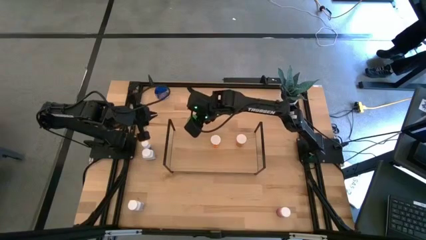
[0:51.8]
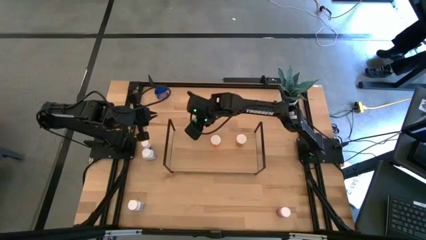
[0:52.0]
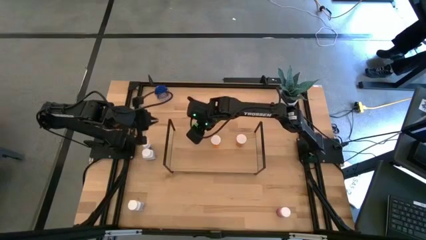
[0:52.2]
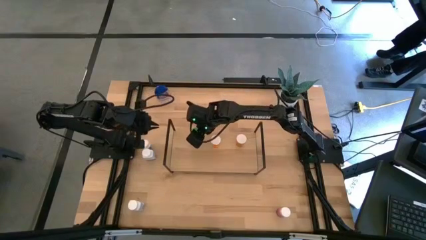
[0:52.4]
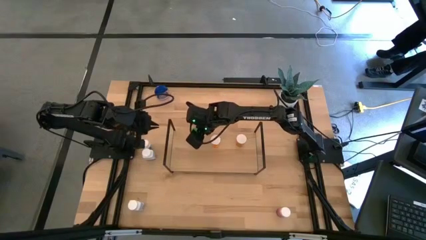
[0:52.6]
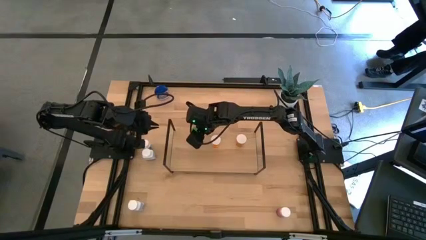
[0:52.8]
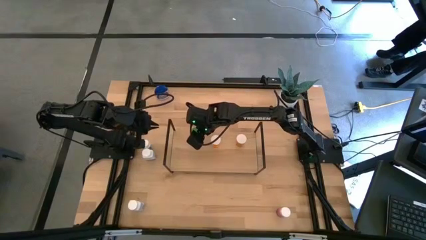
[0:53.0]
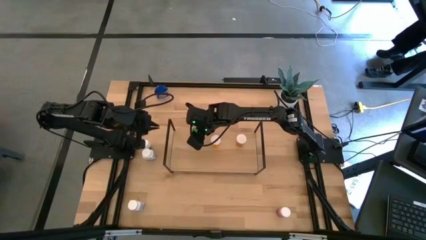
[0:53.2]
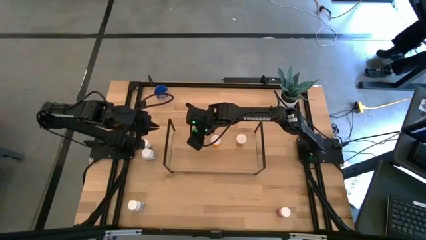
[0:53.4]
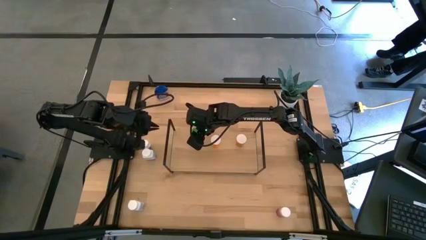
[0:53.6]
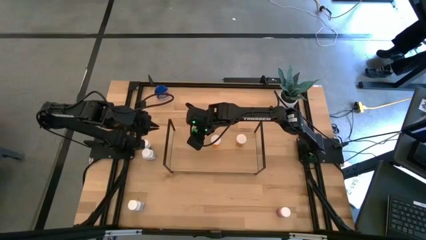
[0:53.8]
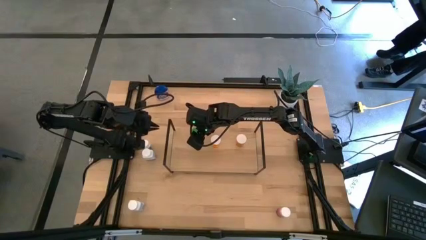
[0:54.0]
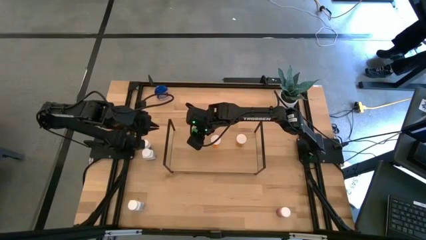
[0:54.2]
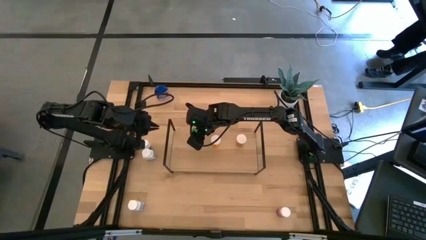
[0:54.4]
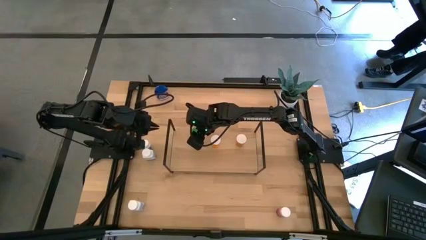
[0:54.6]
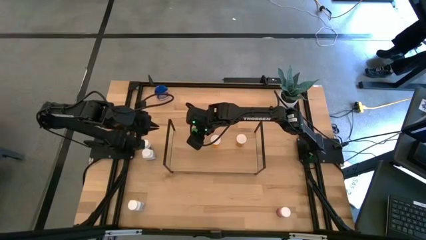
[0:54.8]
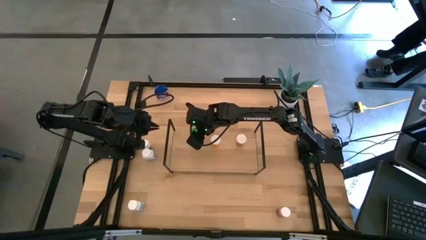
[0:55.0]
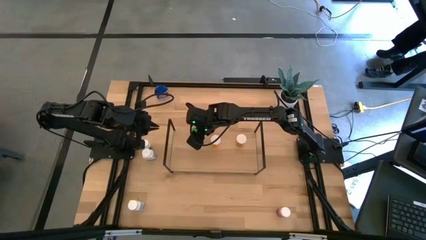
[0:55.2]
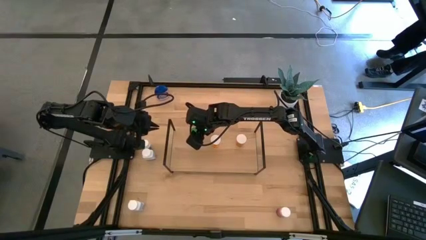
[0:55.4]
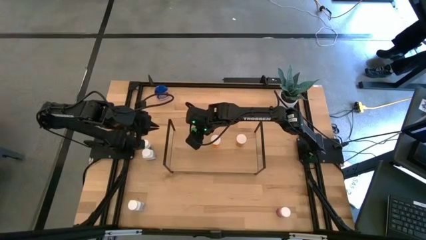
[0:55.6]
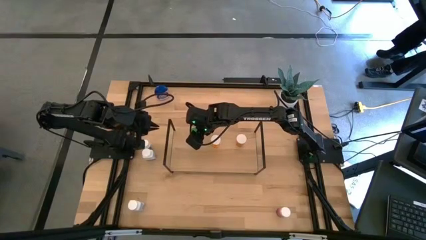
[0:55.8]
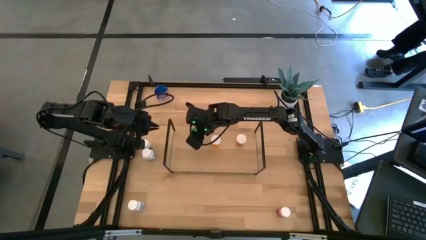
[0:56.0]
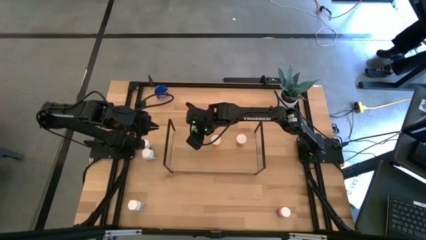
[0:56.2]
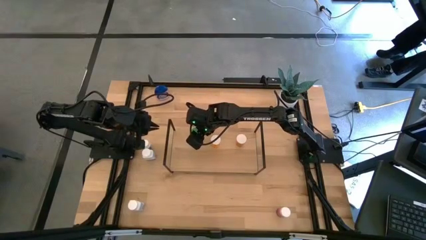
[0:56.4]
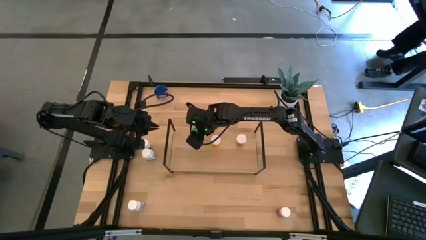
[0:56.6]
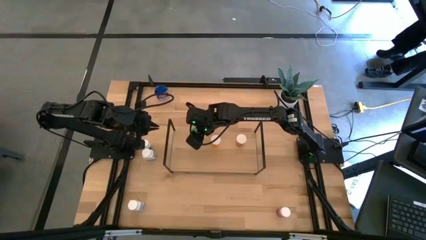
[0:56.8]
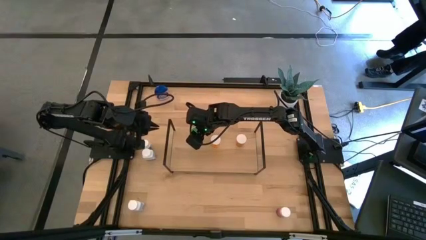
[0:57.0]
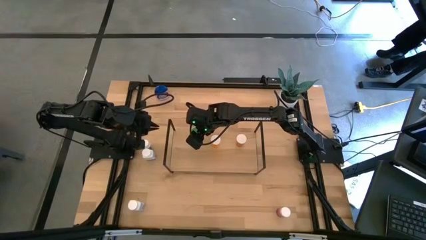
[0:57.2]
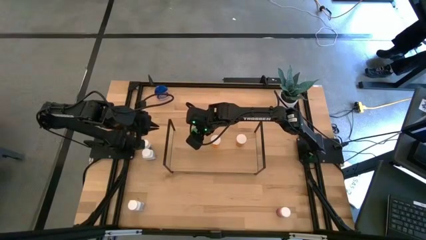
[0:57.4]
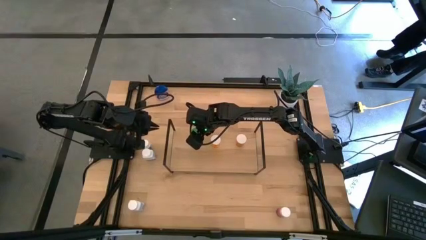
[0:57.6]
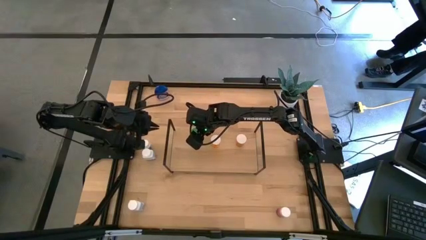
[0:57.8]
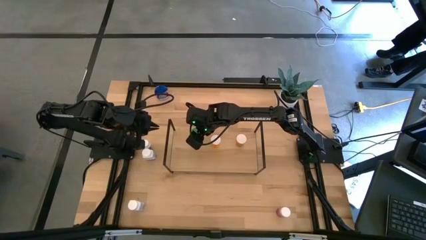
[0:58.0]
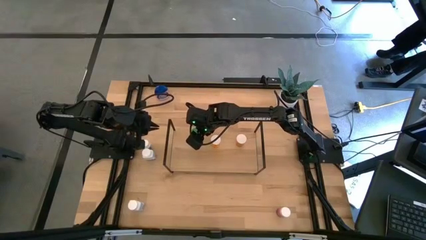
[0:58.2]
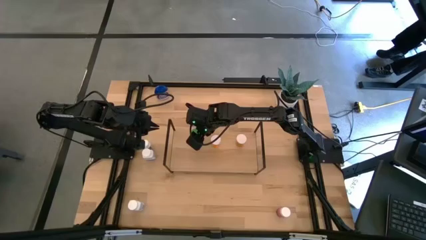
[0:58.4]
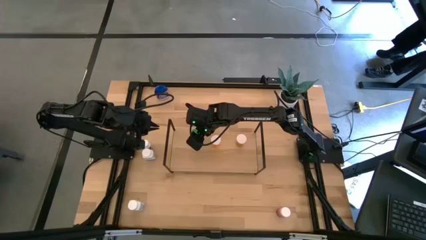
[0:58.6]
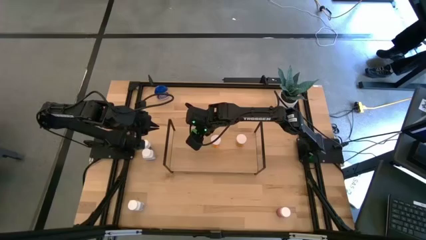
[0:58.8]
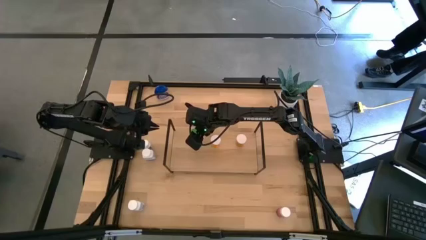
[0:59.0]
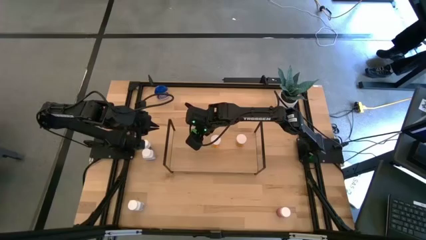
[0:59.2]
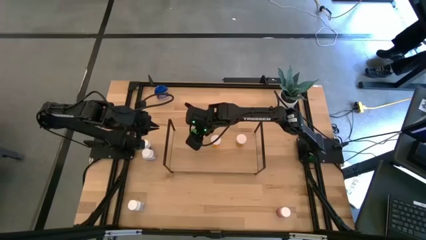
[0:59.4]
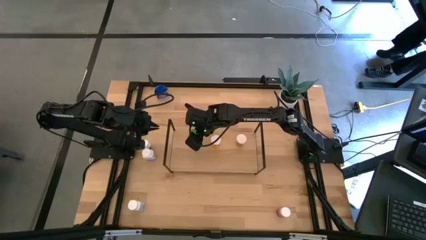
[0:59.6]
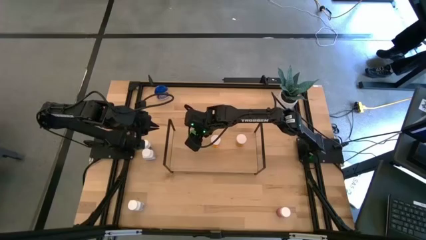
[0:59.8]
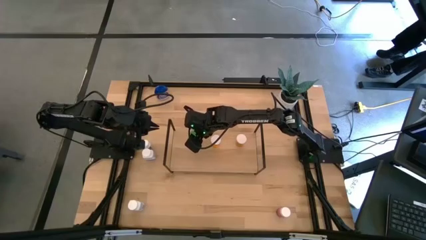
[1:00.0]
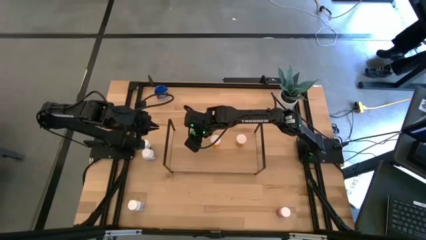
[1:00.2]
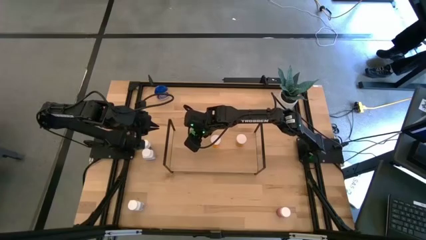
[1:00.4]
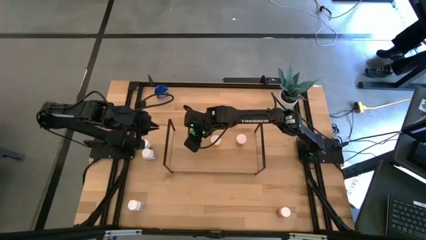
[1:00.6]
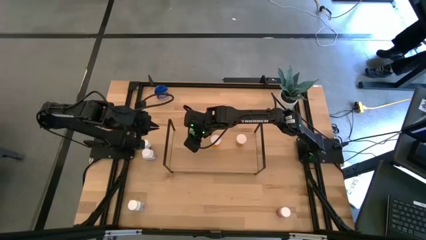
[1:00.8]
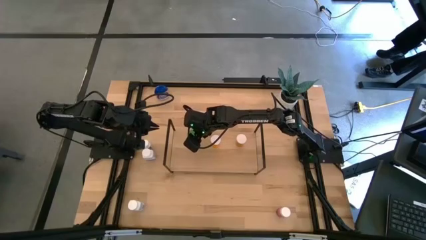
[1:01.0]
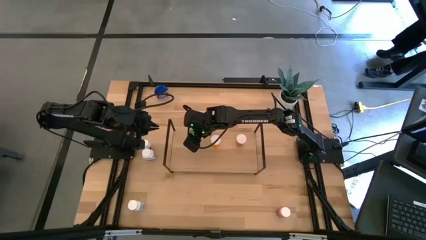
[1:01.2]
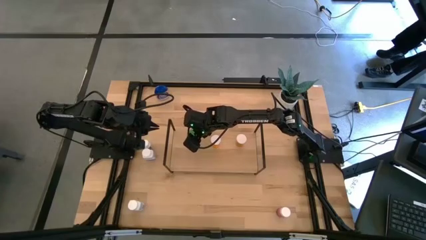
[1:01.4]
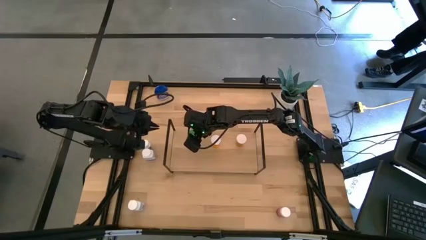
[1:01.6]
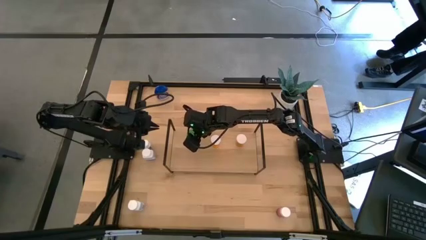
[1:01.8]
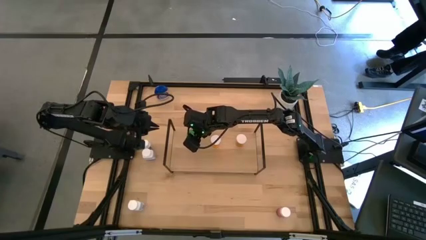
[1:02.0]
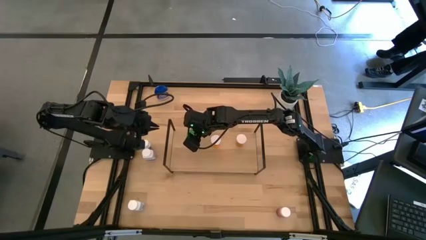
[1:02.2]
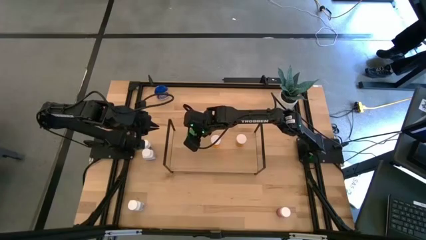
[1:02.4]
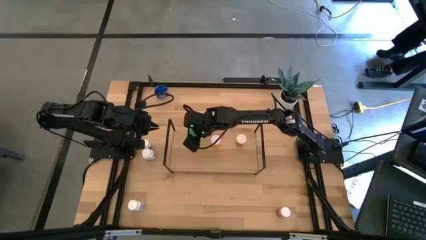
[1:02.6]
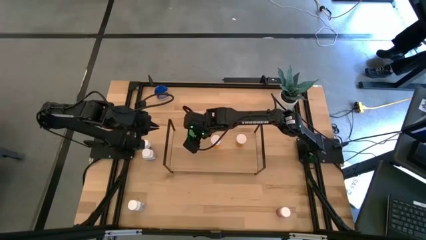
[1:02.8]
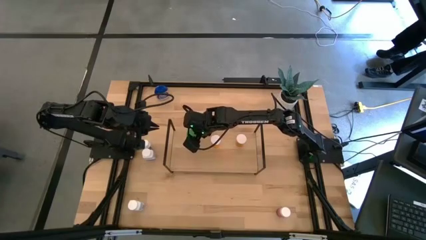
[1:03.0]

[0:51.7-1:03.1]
Task: Pick and place medicine bottles onto shelf by color
Put the green pill bottle on the shelf
